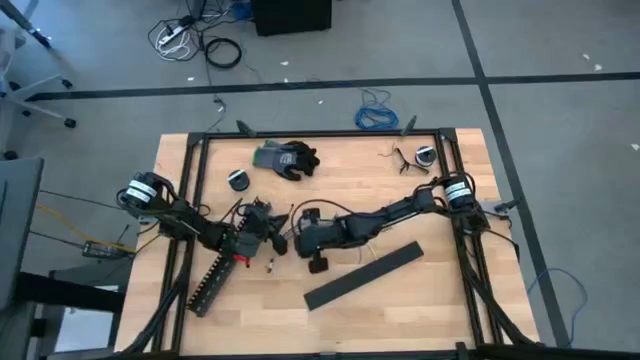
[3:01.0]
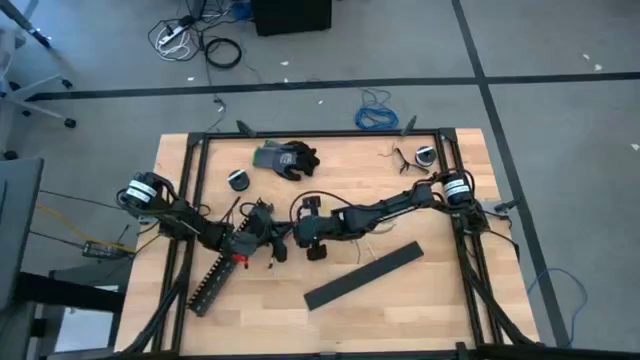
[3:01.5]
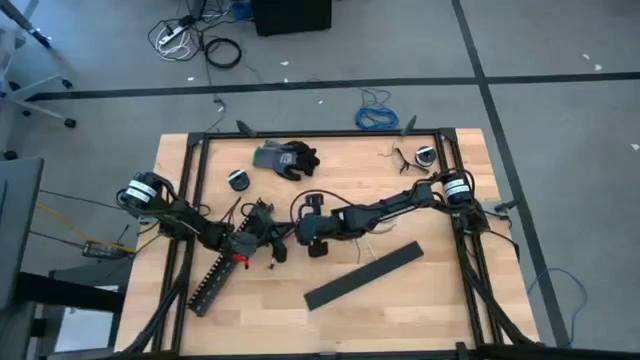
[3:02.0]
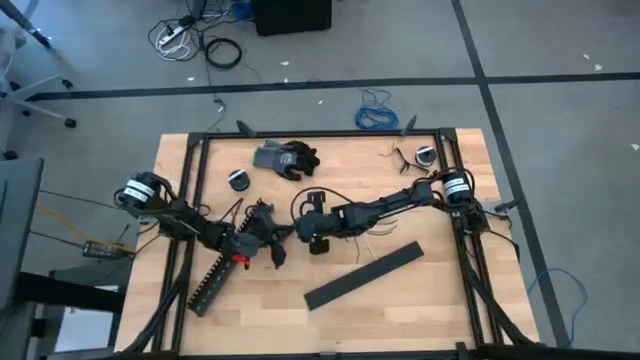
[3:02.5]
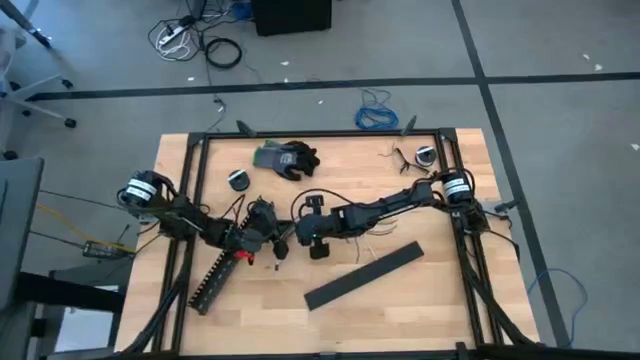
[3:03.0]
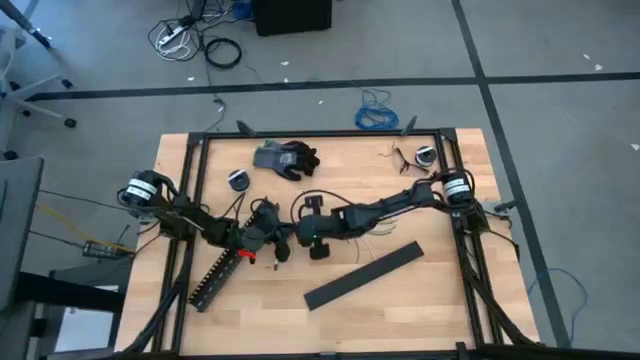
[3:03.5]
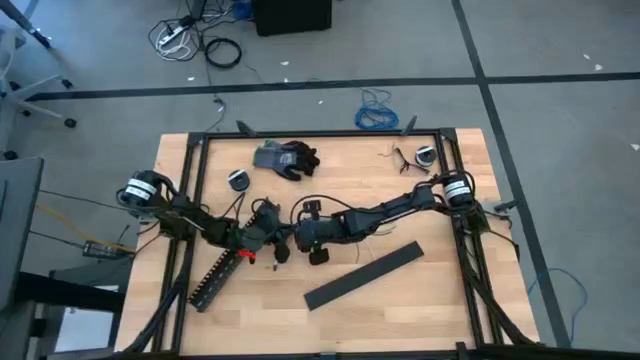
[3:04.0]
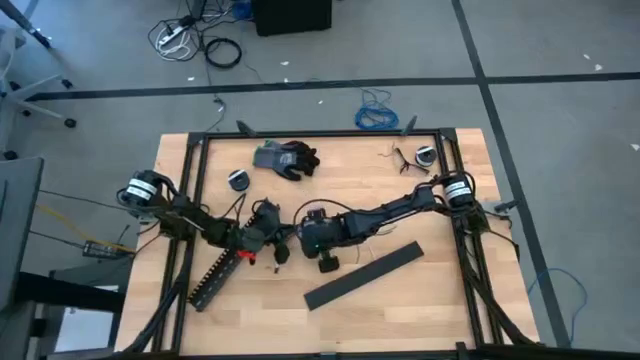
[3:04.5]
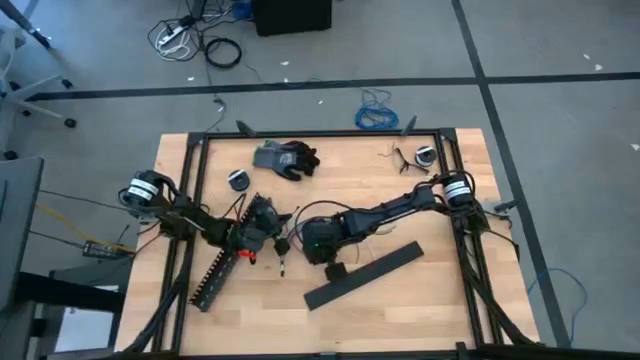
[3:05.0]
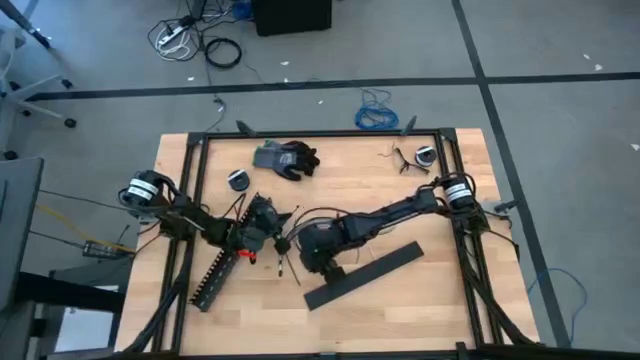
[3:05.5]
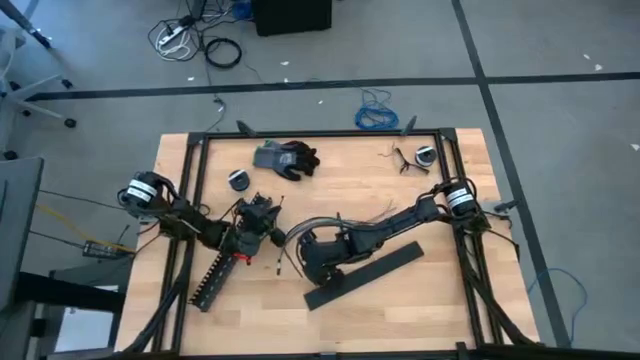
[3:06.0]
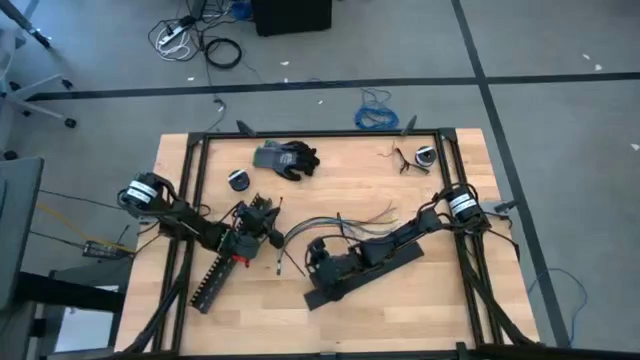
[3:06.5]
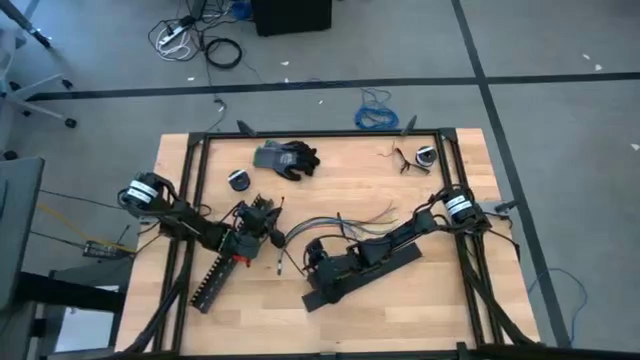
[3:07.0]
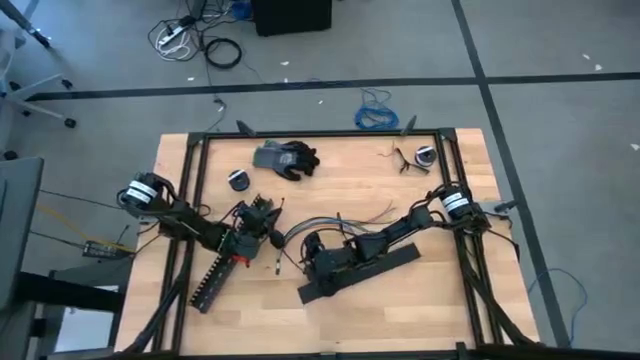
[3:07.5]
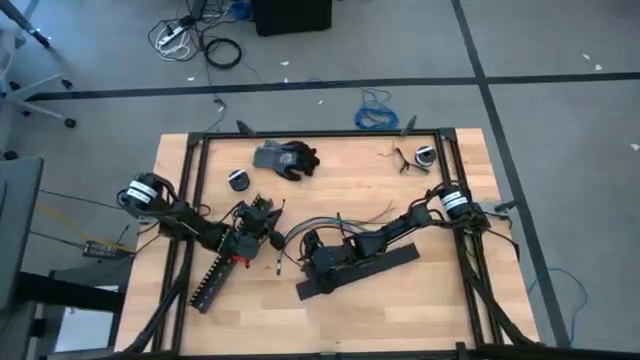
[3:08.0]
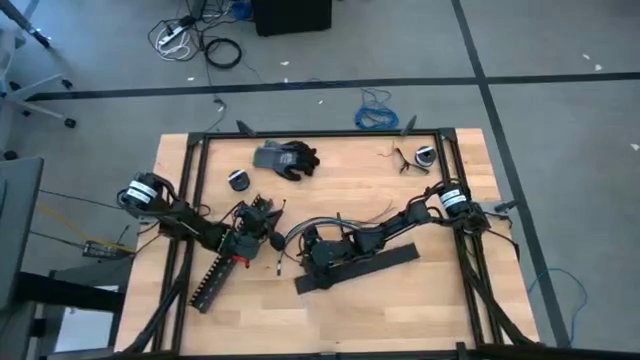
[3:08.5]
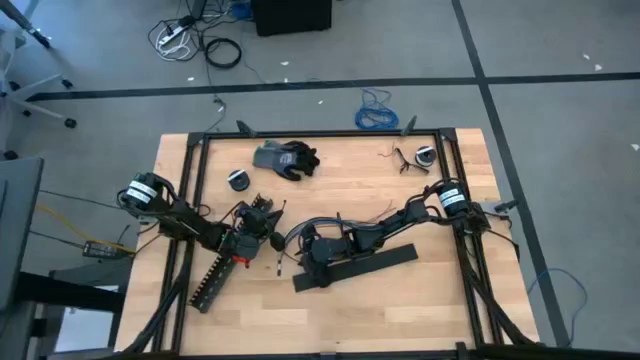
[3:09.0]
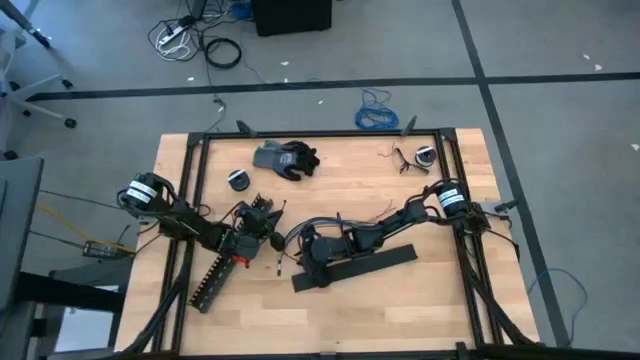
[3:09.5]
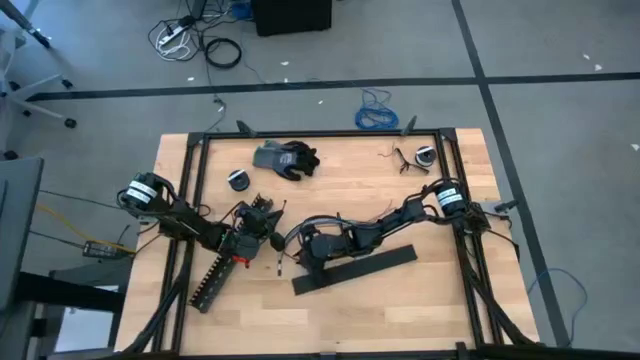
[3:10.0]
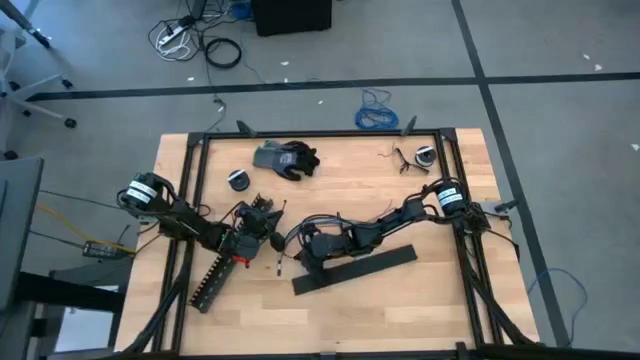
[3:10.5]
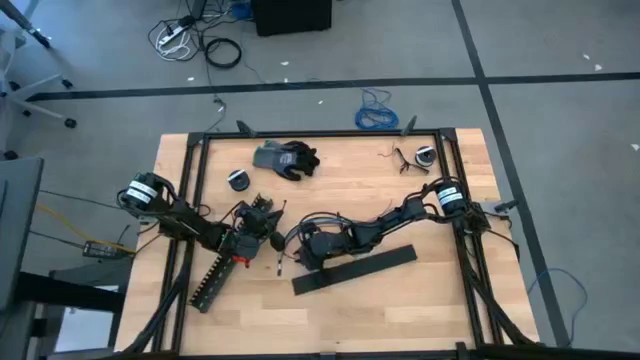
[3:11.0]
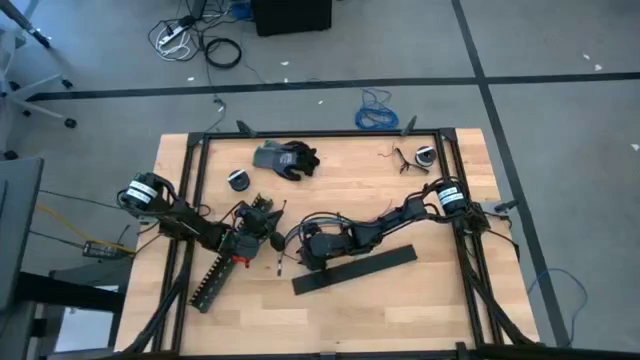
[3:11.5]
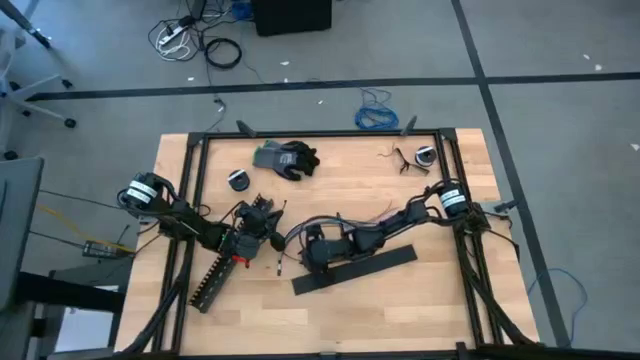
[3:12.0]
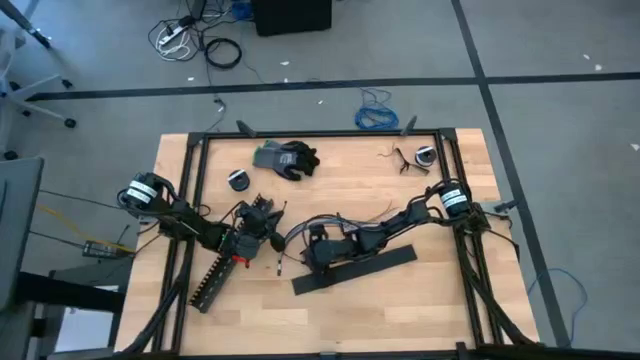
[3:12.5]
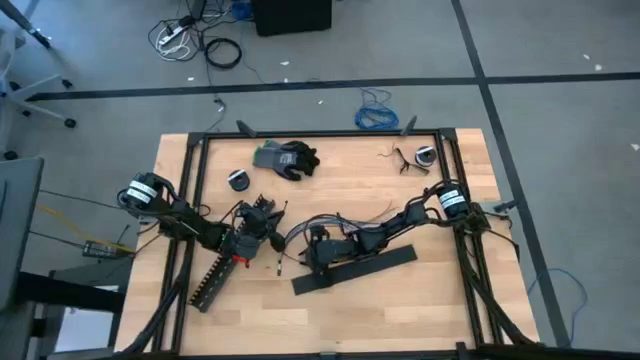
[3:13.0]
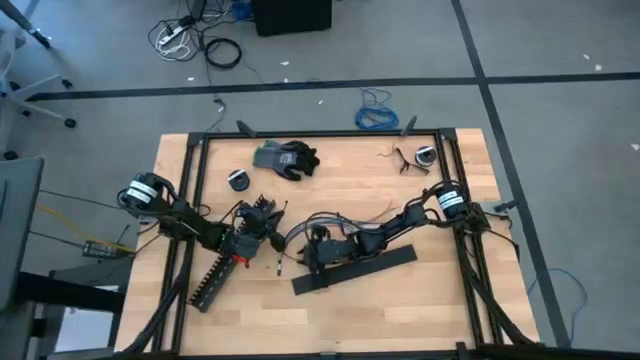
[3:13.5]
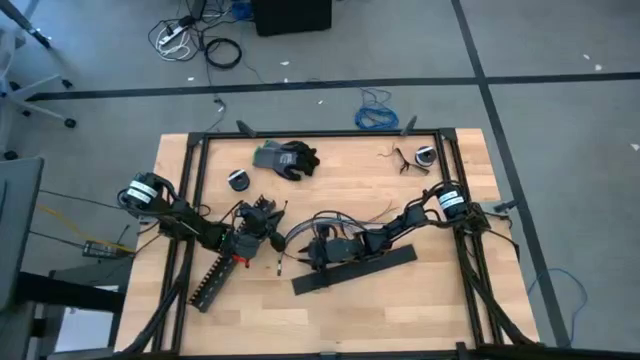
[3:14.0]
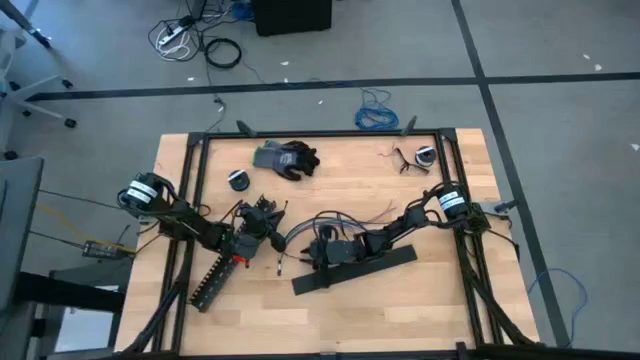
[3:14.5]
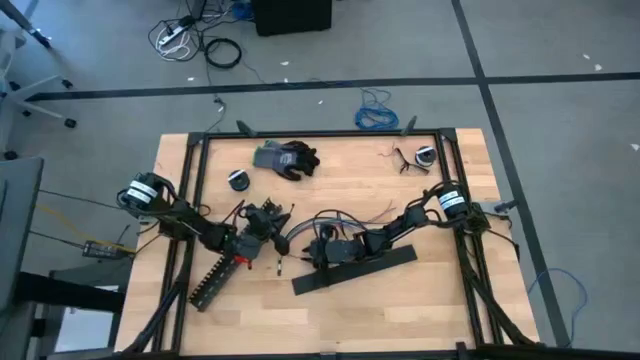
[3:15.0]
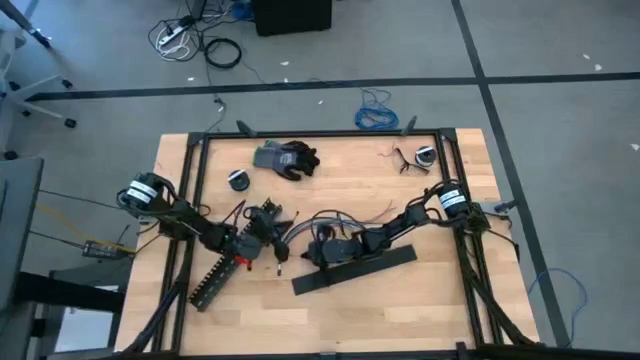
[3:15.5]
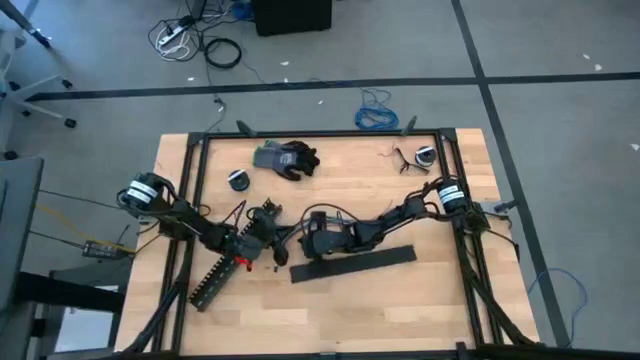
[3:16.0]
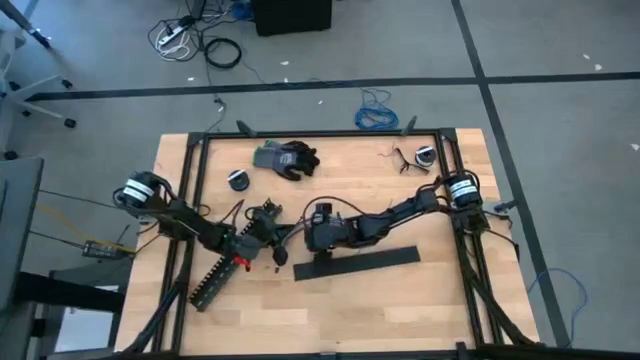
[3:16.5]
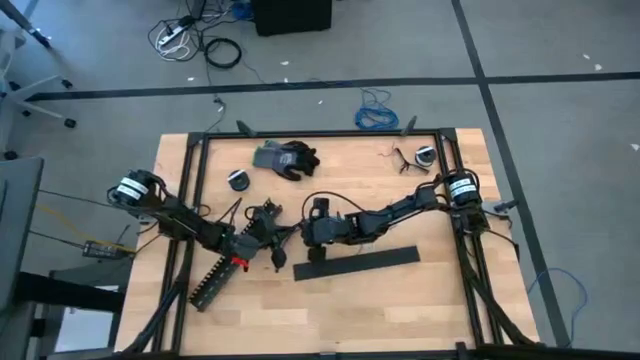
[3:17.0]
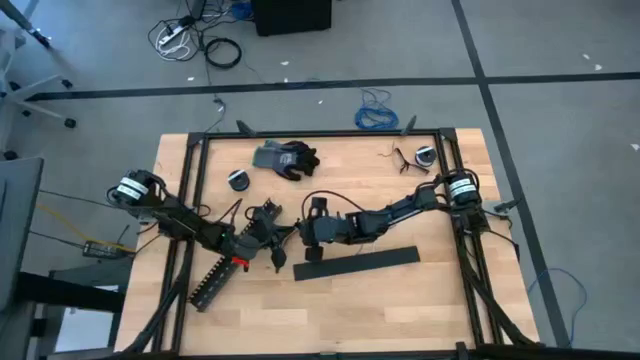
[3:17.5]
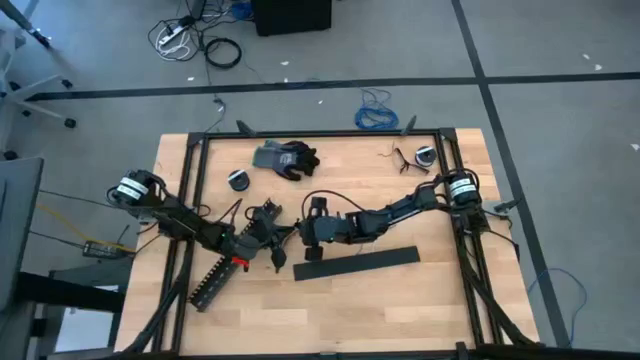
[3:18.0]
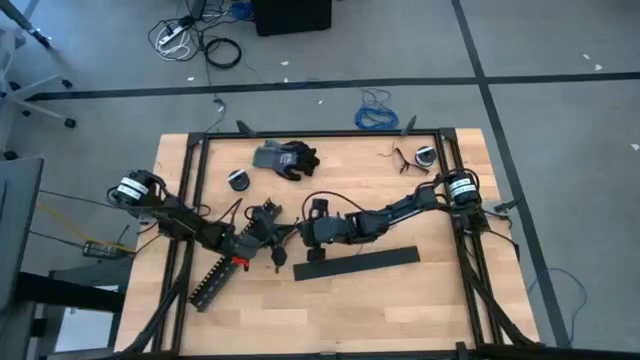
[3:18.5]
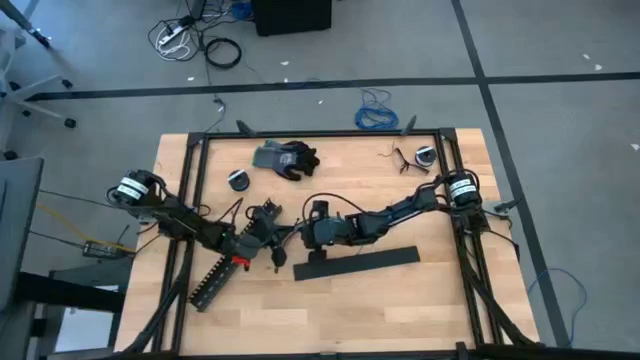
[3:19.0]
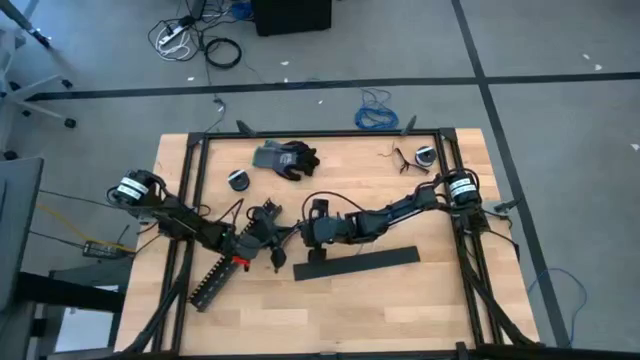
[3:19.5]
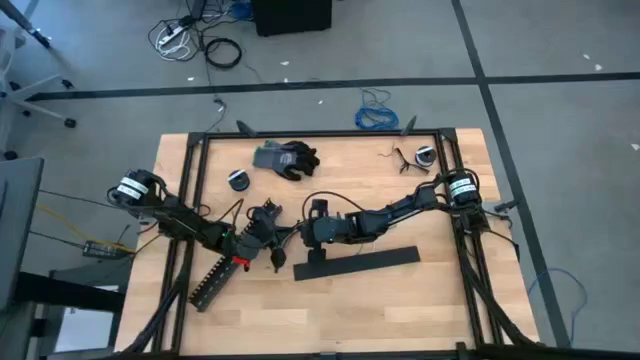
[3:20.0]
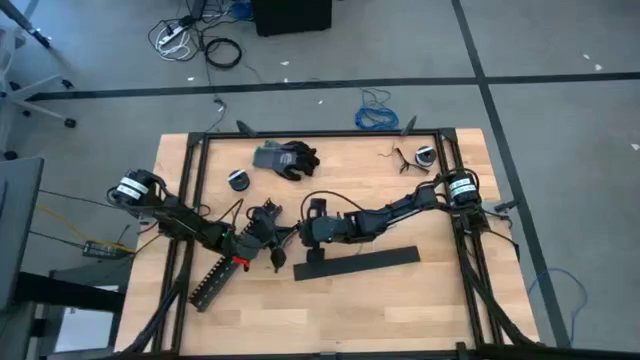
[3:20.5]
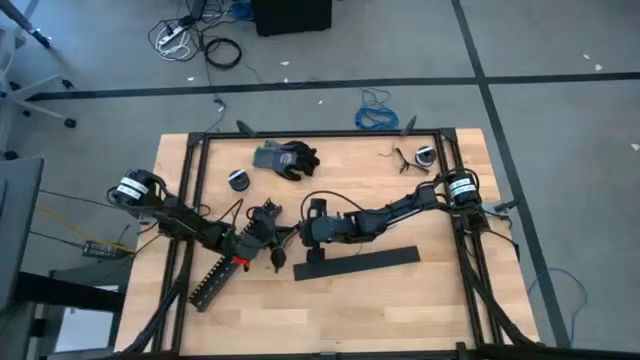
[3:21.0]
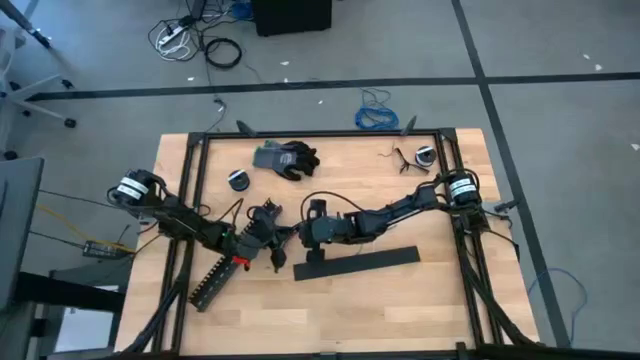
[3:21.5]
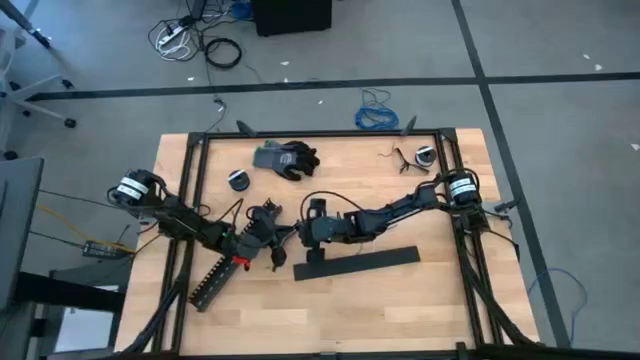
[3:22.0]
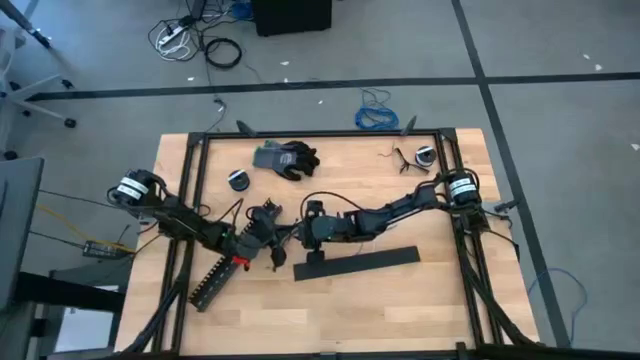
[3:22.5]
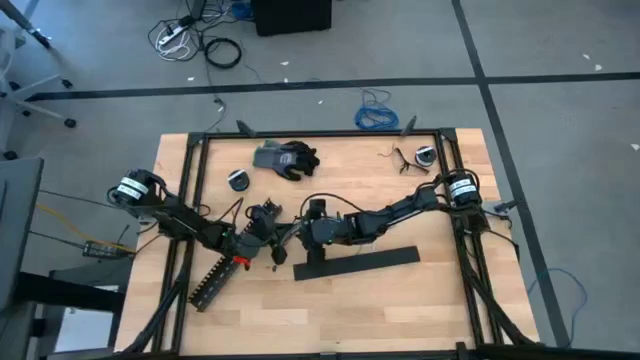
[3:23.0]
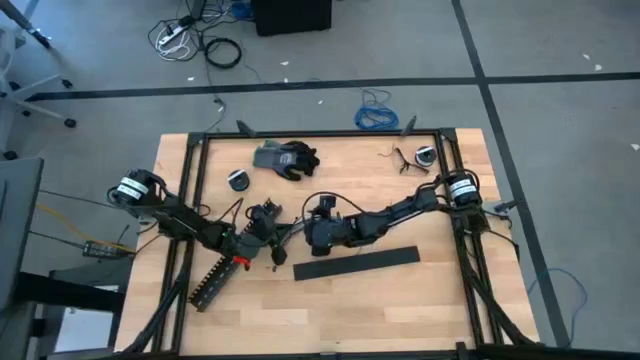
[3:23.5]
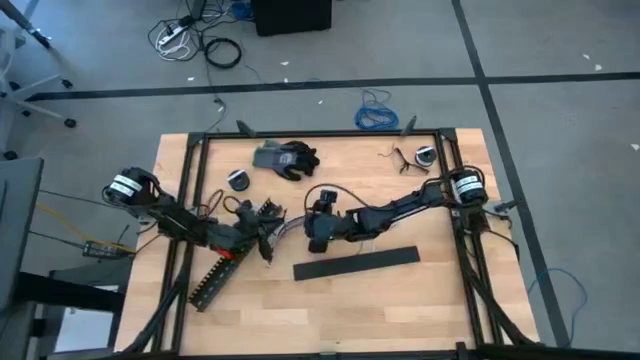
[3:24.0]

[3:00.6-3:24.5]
Task: Ziptie cables
Wrap the other black zip tie on the cable wires
